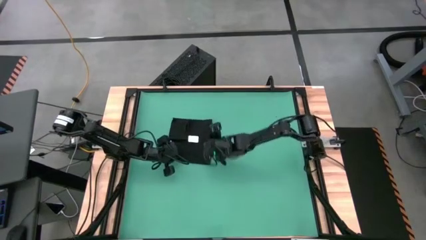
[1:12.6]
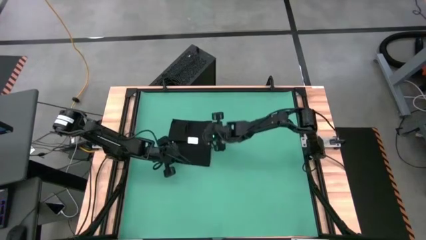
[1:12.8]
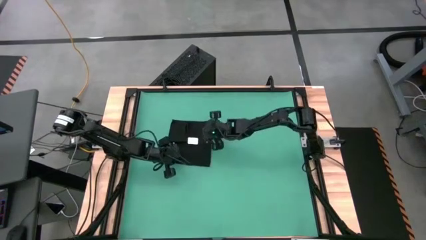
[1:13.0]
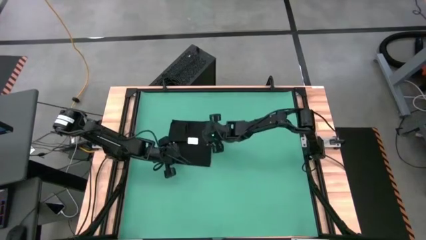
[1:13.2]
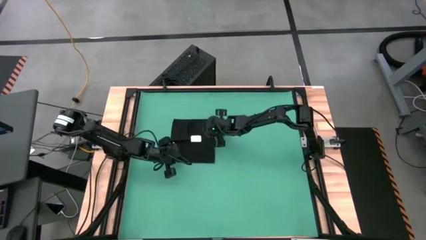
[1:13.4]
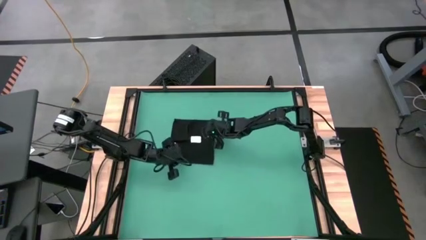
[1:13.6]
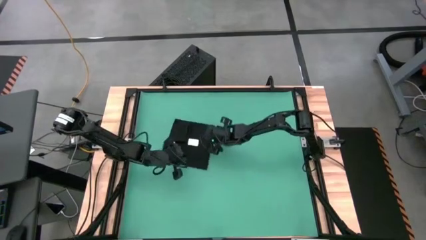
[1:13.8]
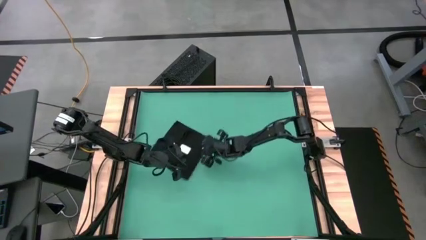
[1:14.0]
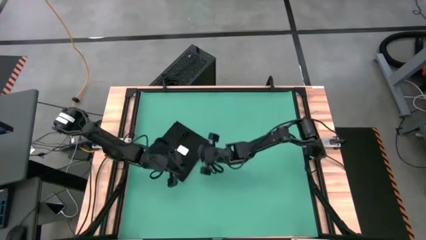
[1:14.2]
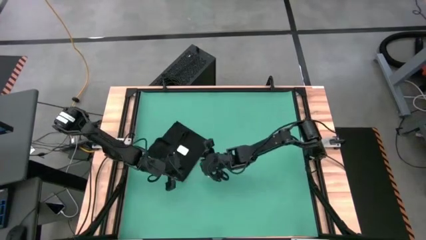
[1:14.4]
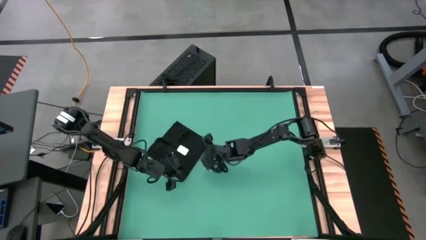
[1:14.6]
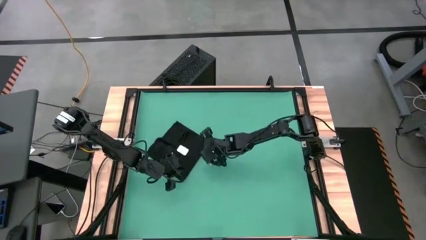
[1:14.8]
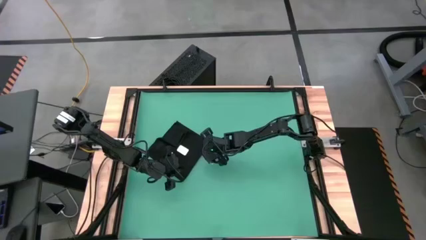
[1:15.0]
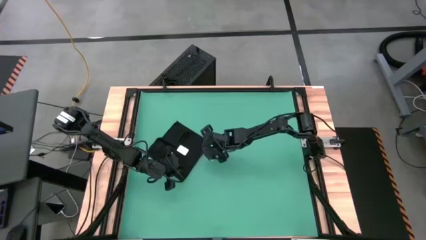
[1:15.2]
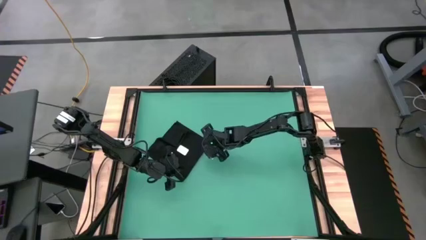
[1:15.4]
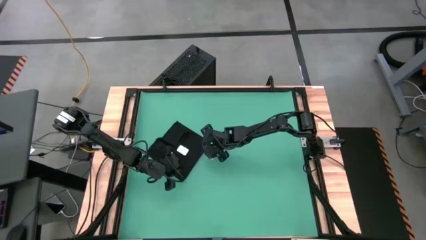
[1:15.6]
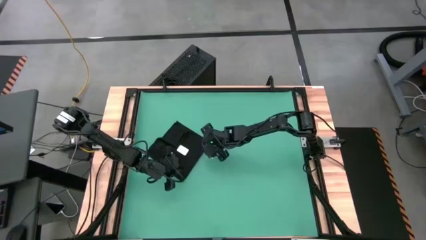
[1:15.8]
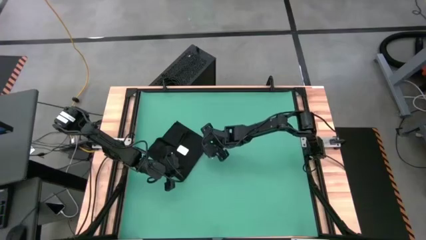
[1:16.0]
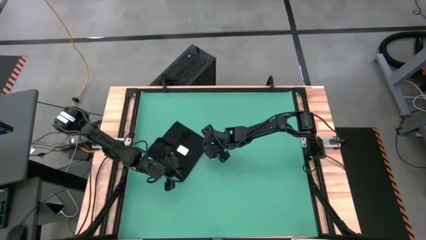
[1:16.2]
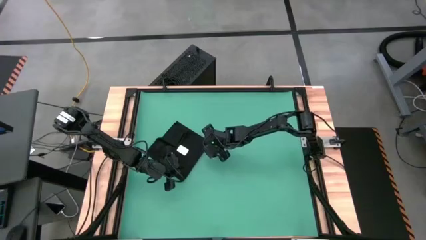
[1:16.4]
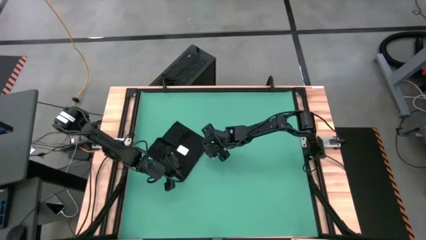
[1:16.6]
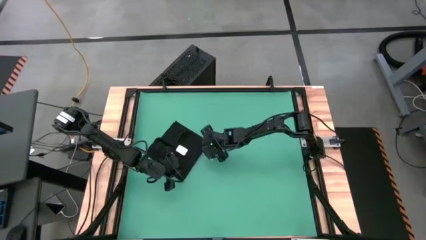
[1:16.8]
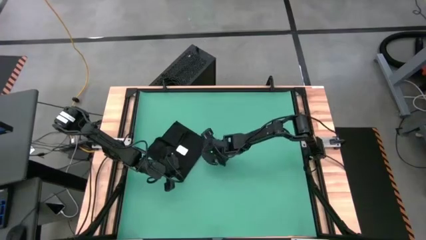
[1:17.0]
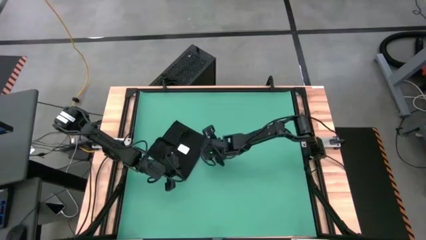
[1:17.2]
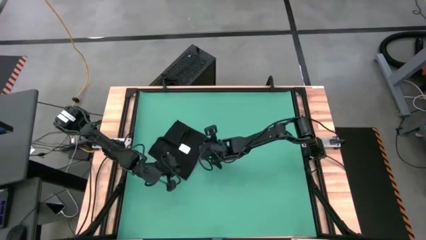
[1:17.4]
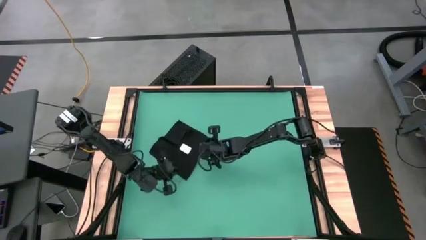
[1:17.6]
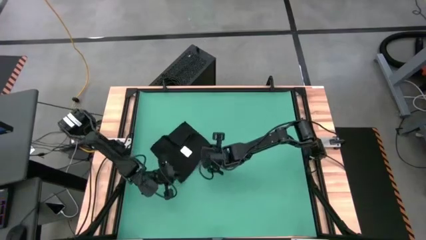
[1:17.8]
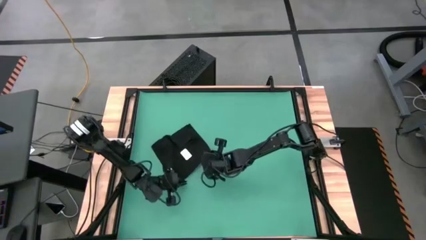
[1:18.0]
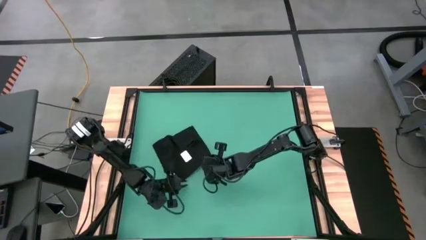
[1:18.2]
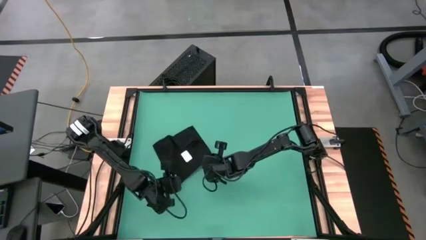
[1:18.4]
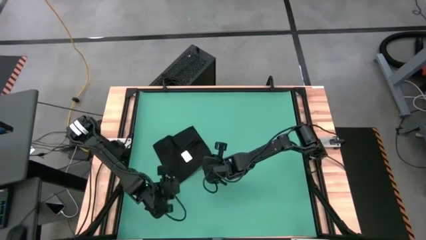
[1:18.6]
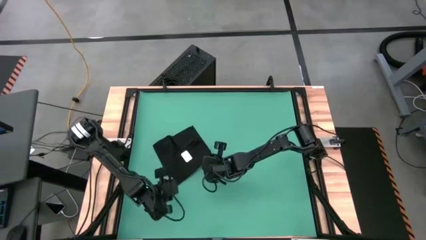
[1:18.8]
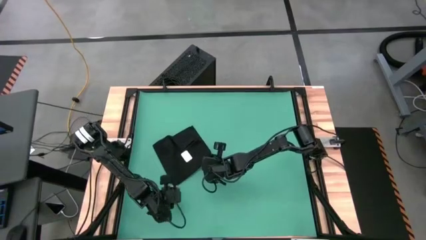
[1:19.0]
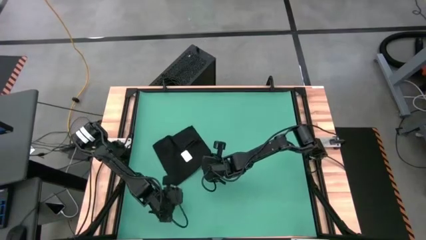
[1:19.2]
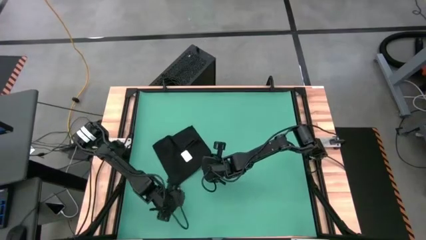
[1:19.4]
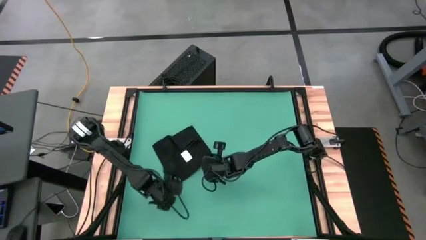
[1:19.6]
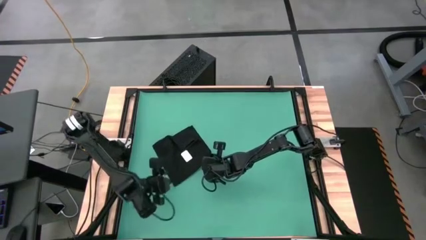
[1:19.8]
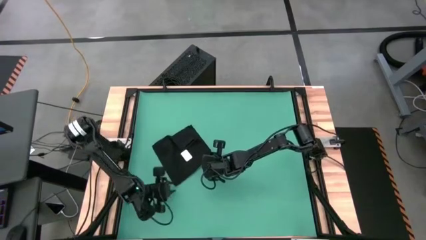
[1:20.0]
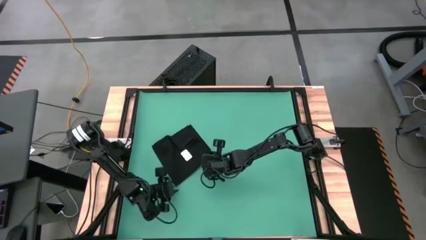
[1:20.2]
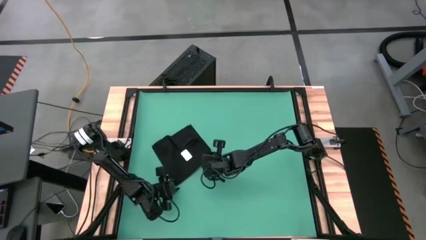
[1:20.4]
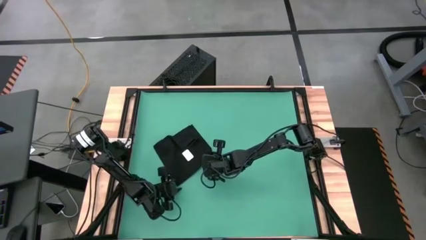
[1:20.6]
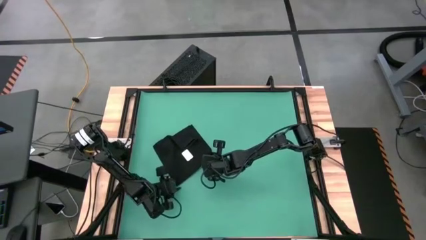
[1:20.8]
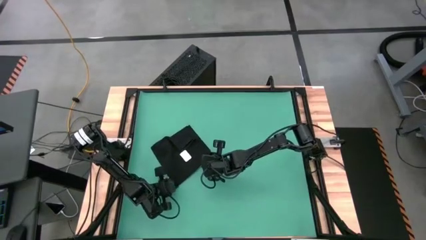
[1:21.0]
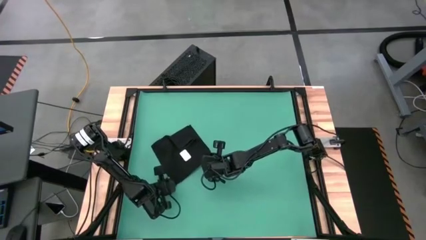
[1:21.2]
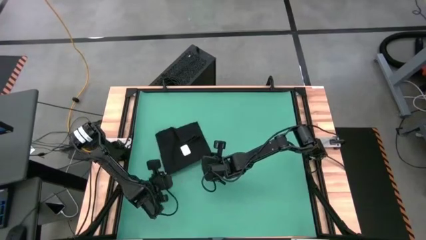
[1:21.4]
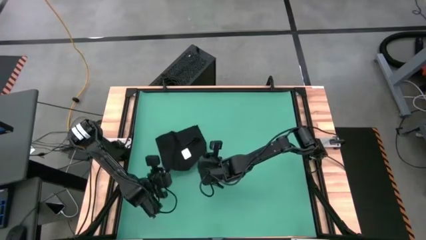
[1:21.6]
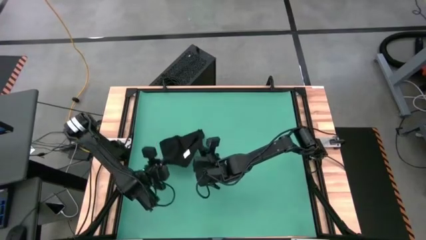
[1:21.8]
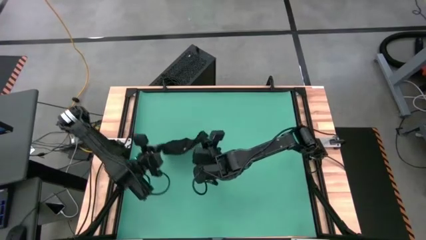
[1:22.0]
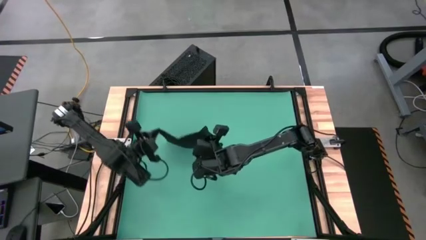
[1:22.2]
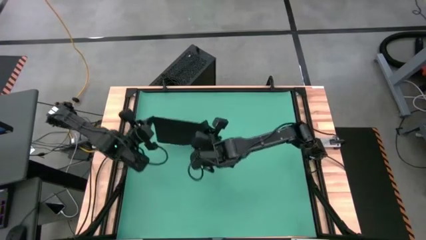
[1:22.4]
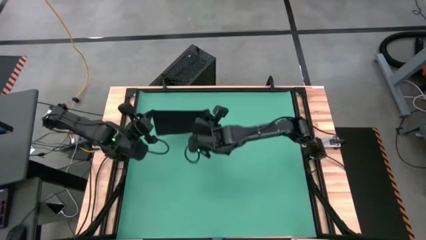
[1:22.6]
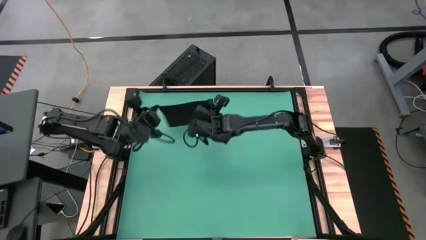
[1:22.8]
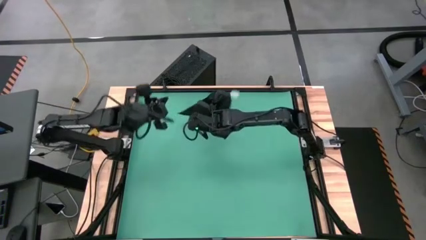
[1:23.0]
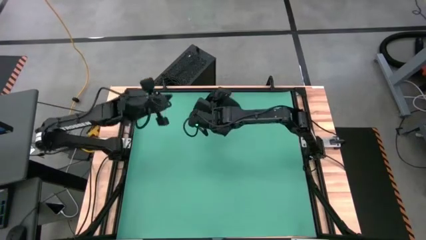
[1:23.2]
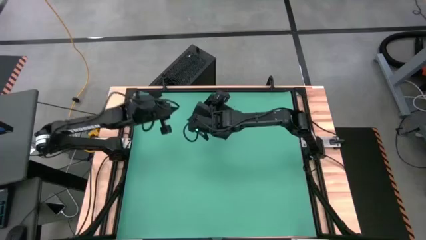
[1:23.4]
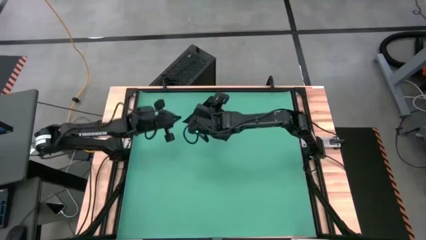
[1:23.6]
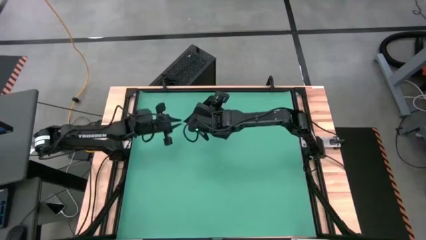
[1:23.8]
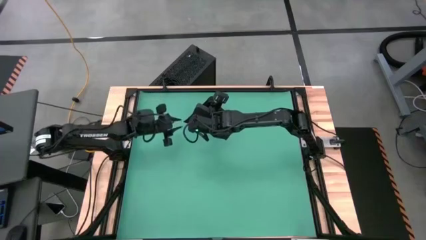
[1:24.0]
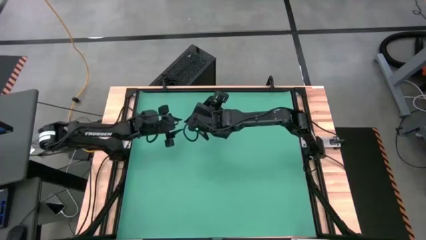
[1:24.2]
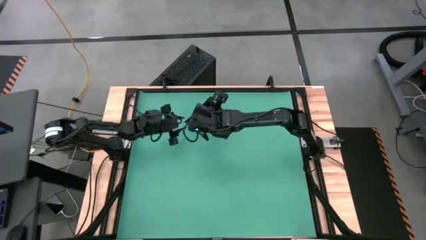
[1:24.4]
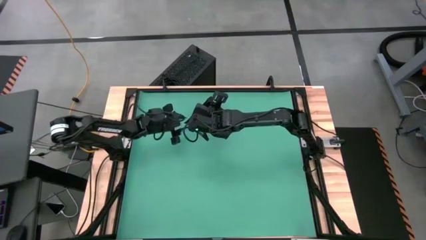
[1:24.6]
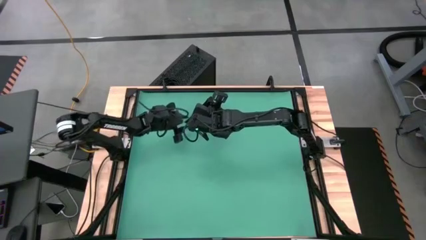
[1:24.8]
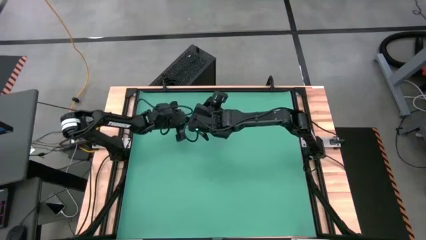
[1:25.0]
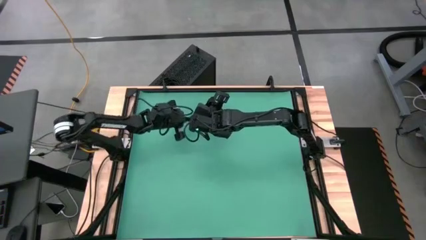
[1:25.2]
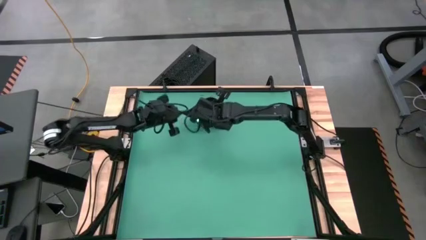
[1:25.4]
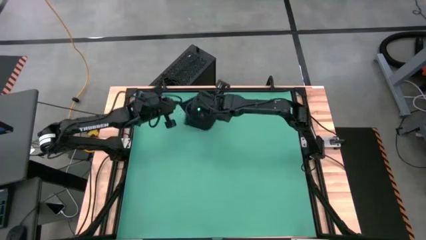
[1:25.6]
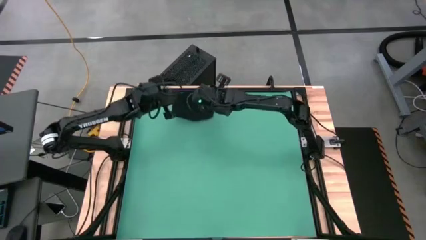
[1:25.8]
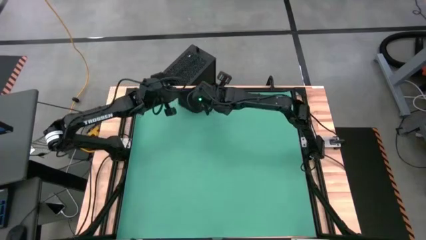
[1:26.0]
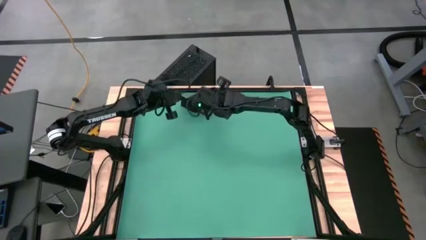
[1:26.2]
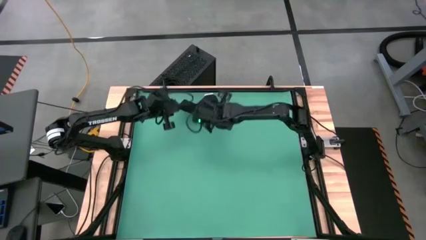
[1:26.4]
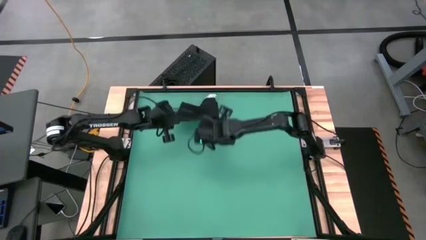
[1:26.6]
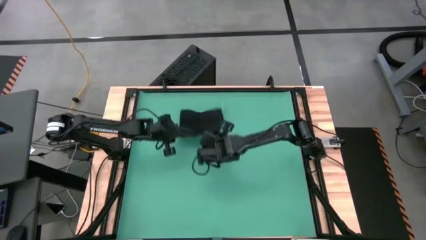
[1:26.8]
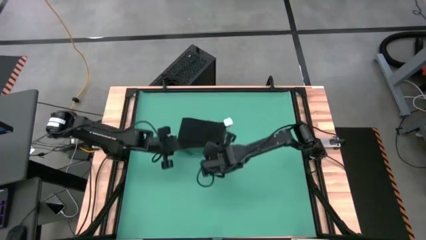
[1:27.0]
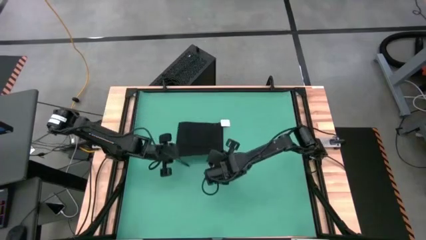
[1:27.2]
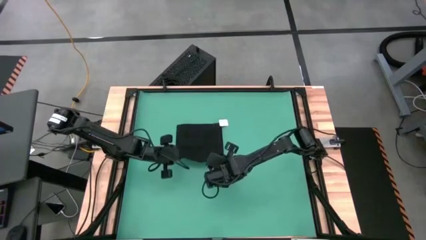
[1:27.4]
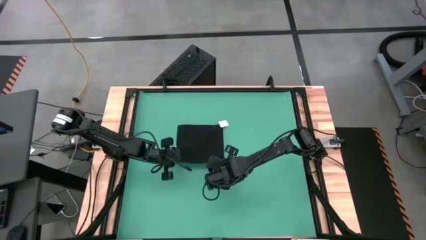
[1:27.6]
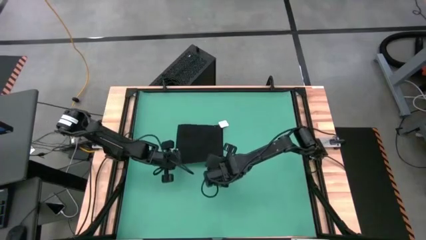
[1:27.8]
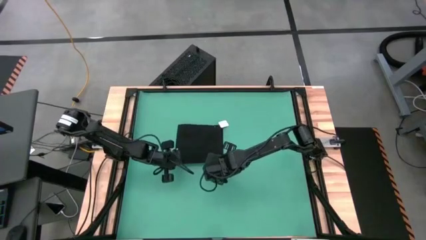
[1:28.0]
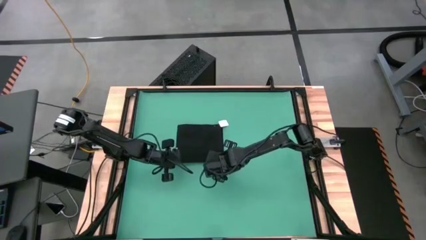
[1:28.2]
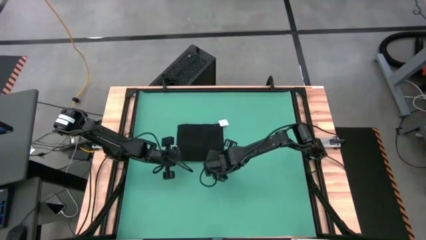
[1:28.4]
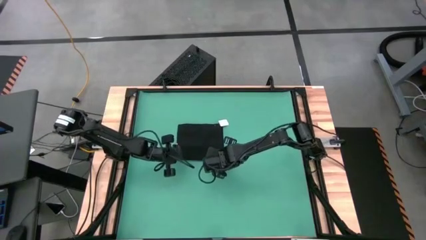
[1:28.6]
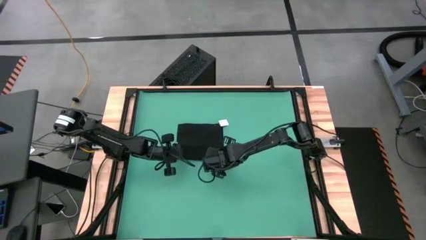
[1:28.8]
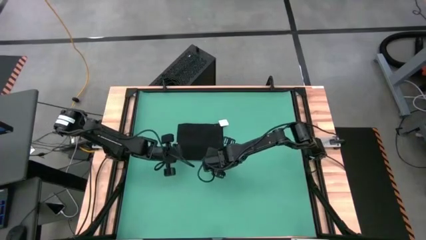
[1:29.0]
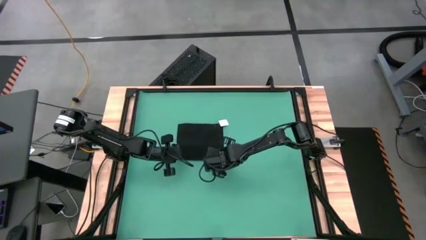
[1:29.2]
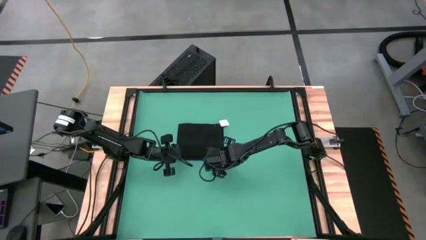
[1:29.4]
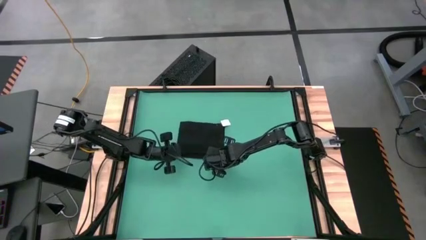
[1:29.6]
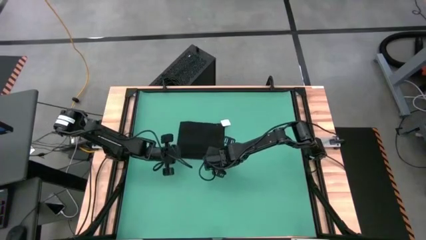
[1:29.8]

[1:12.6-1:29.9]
Task: Roll towel
Roll the black towel
